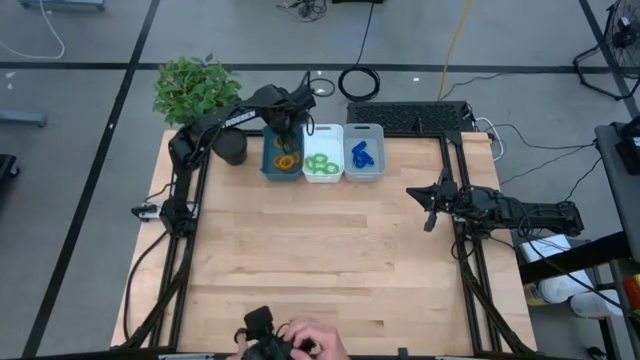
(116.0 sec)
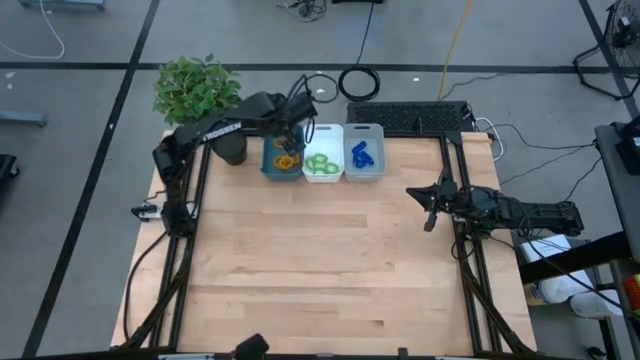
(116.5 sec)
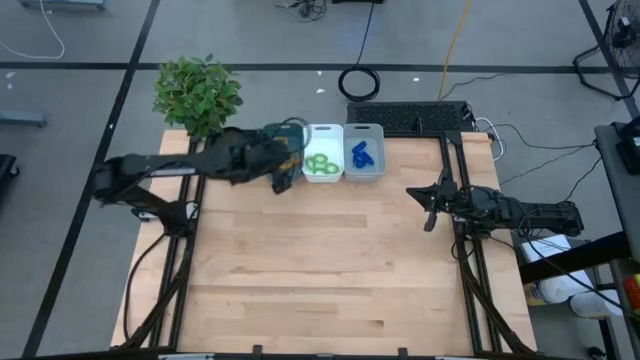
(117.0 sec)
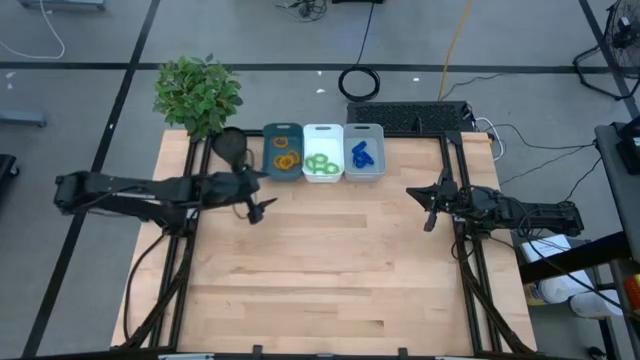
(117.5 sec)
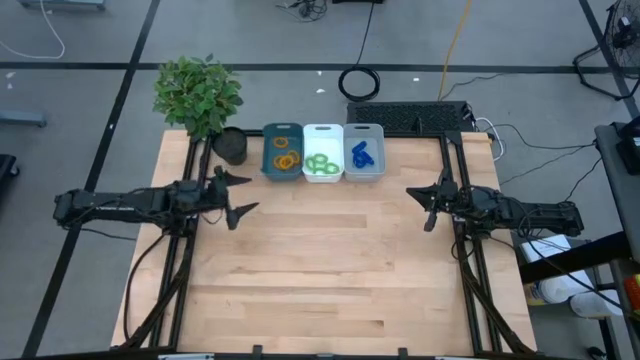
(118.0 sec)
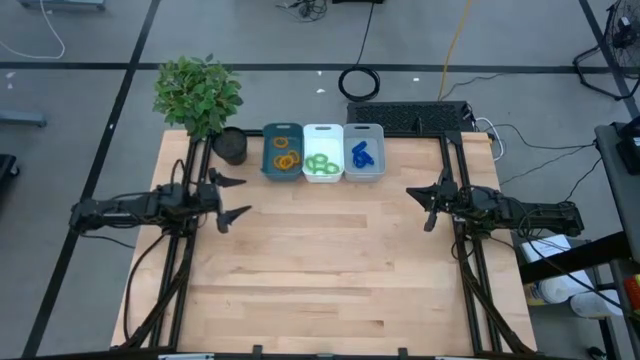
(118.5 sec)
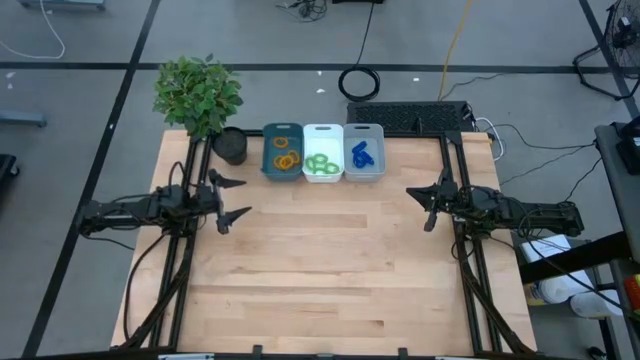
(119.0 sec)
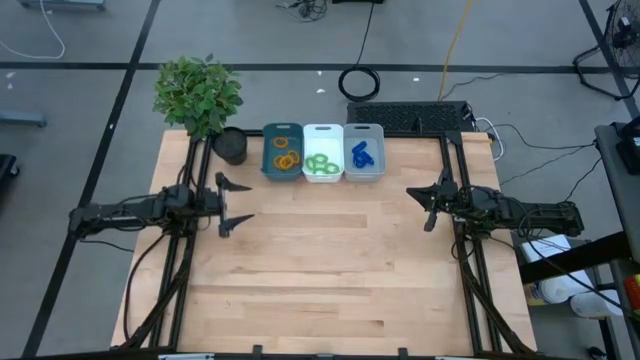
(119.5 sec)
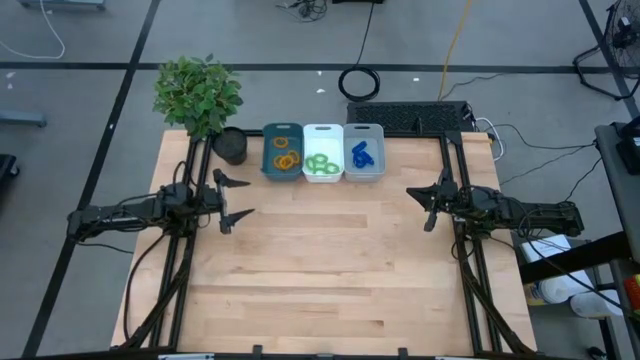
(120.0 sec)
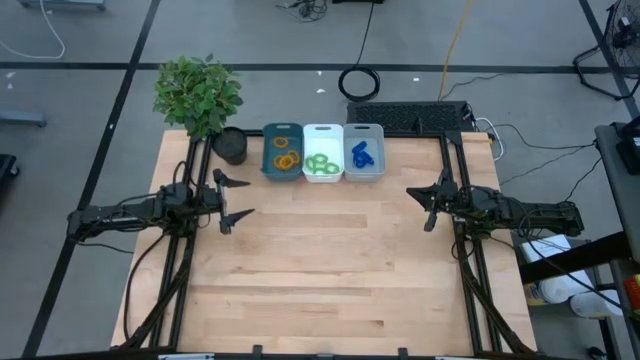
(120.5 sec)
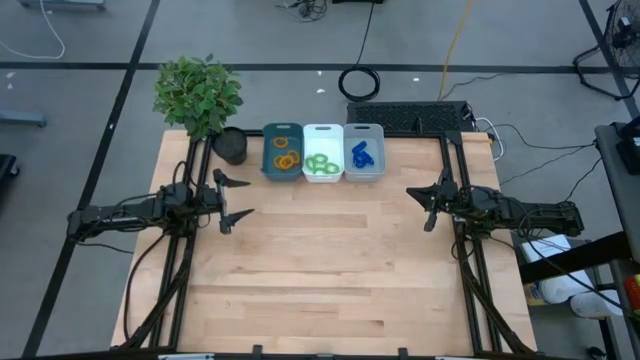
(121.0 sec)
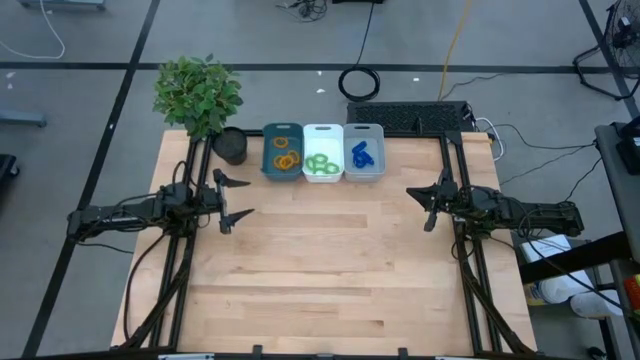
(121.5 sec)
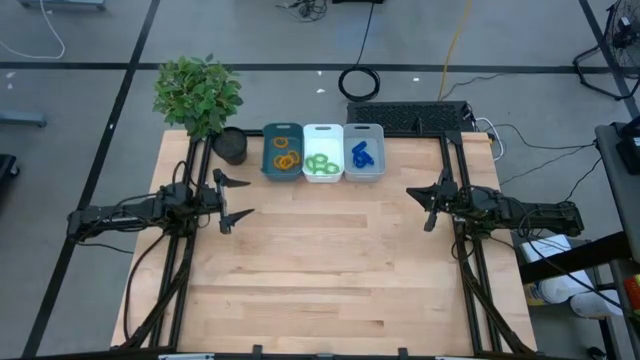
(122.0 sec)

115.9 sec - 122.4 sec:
Task: Sort spring keychains
Return to Home Position

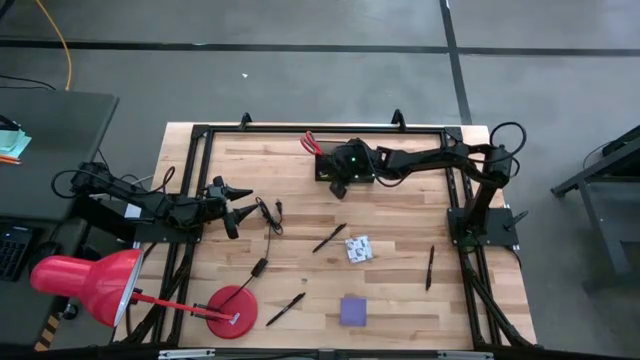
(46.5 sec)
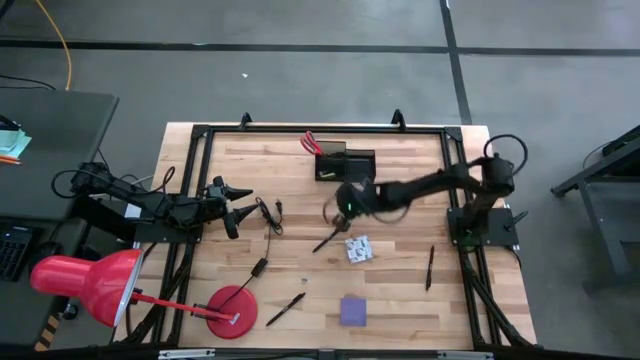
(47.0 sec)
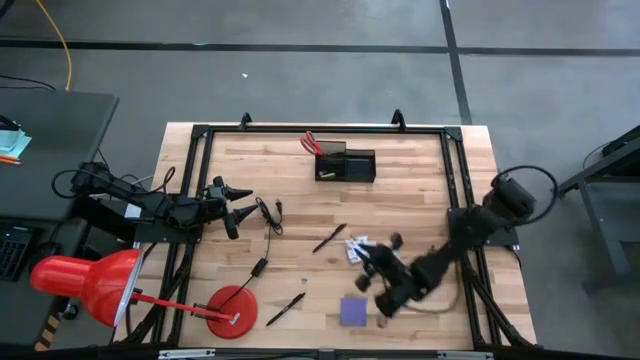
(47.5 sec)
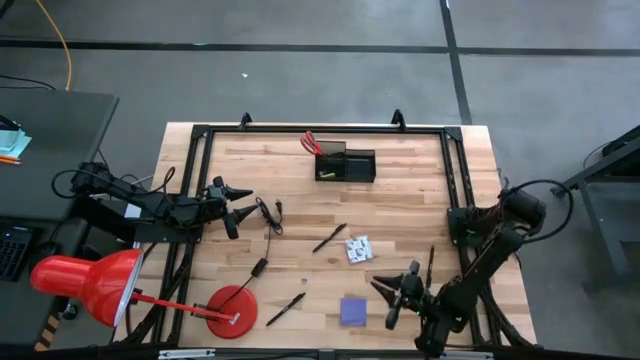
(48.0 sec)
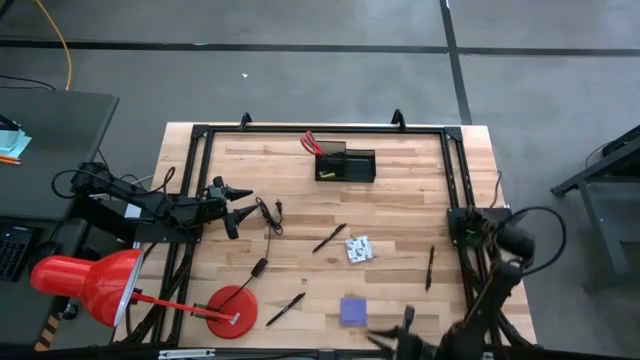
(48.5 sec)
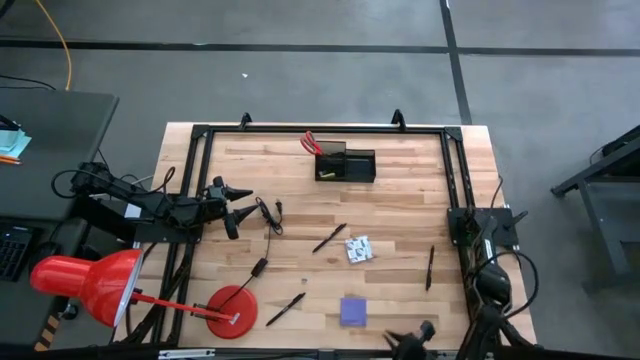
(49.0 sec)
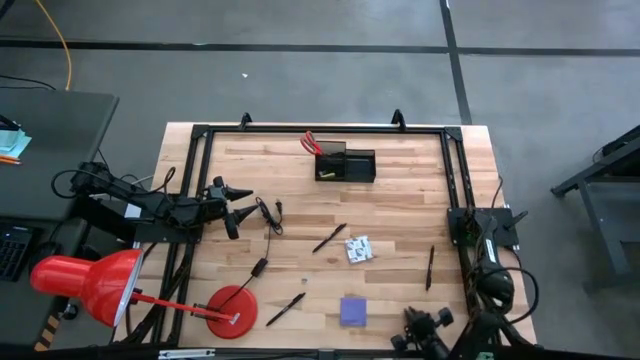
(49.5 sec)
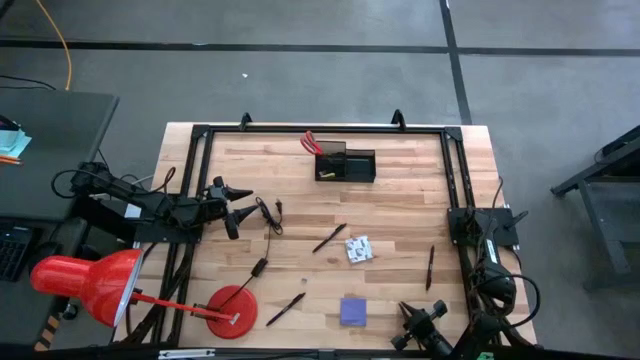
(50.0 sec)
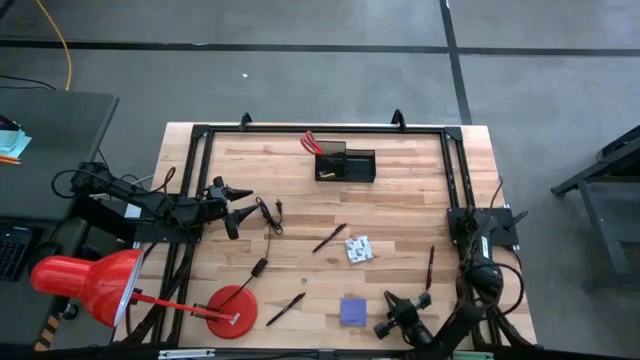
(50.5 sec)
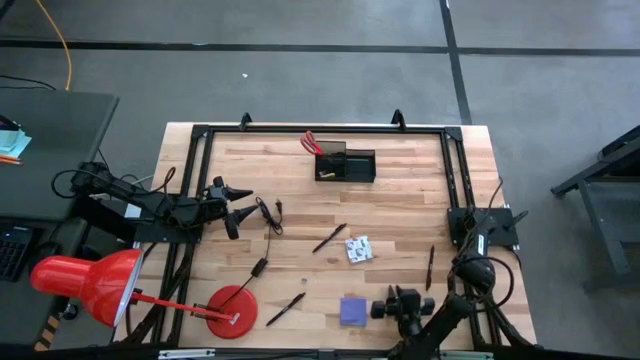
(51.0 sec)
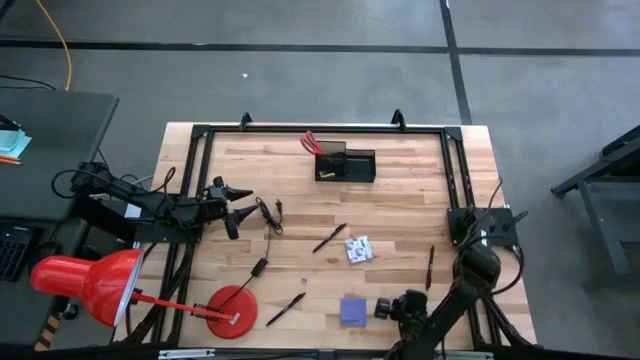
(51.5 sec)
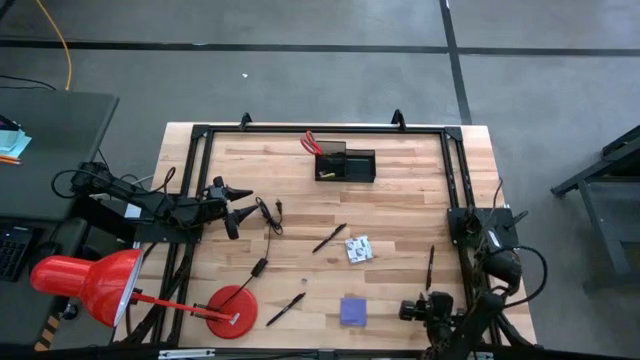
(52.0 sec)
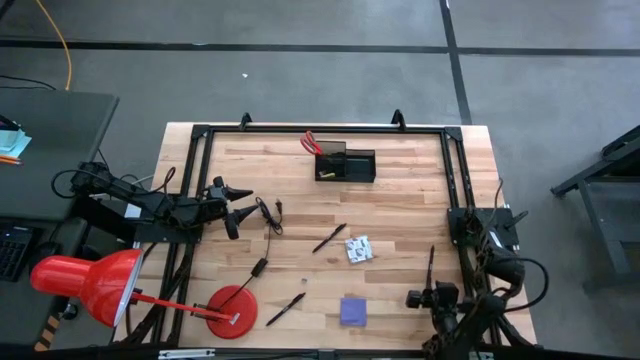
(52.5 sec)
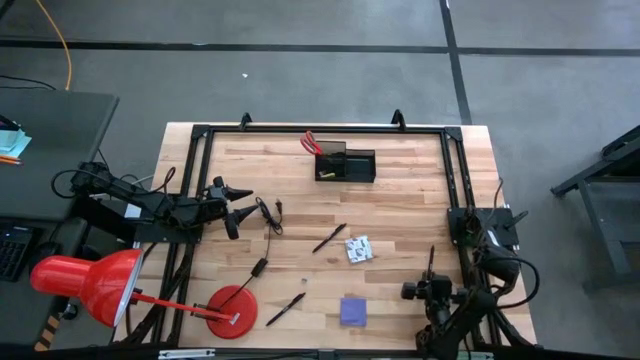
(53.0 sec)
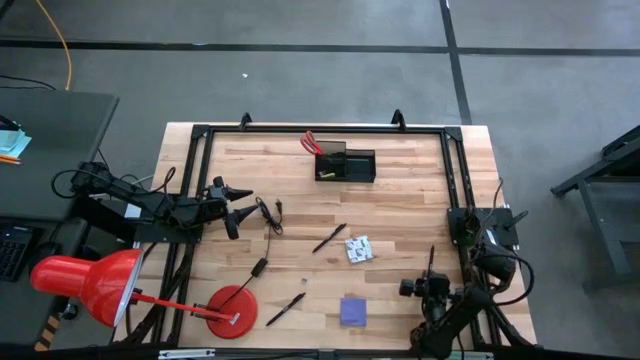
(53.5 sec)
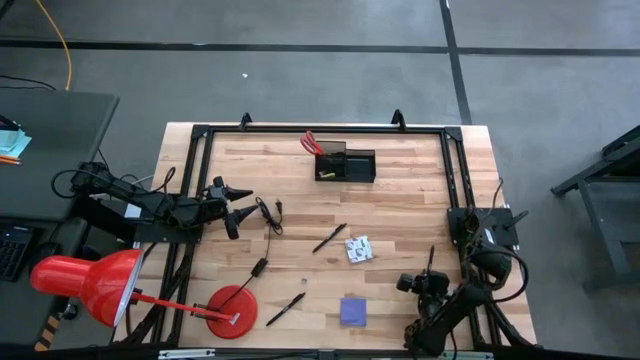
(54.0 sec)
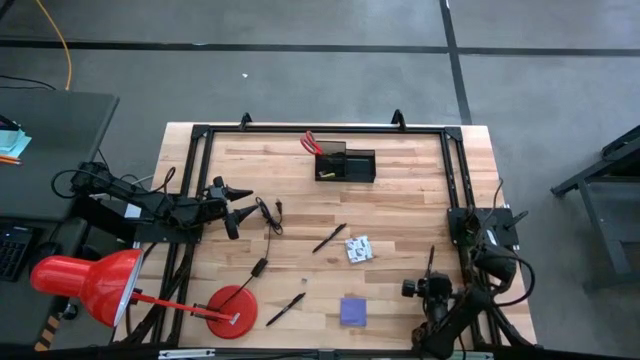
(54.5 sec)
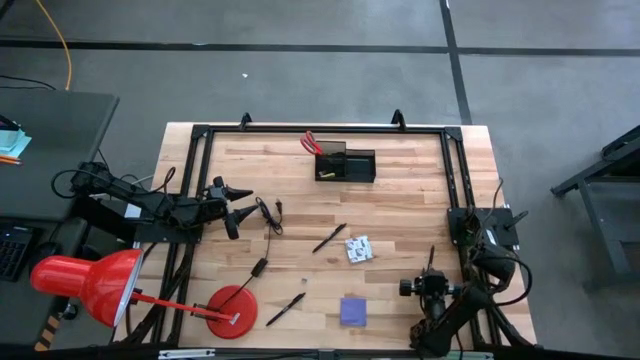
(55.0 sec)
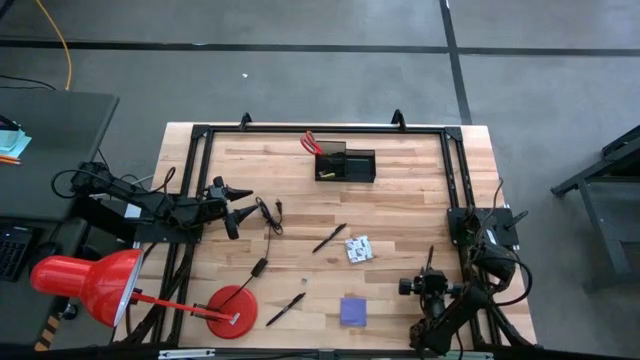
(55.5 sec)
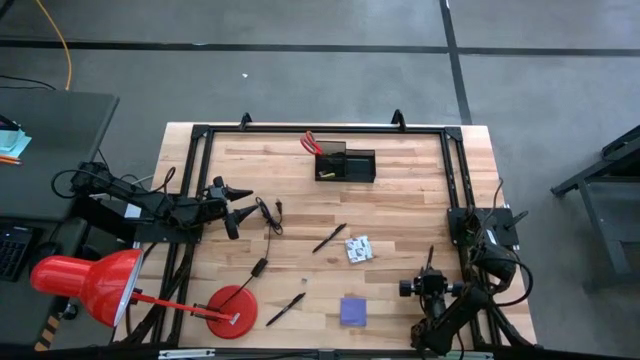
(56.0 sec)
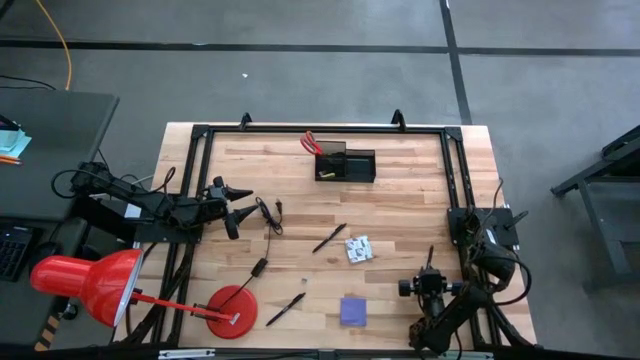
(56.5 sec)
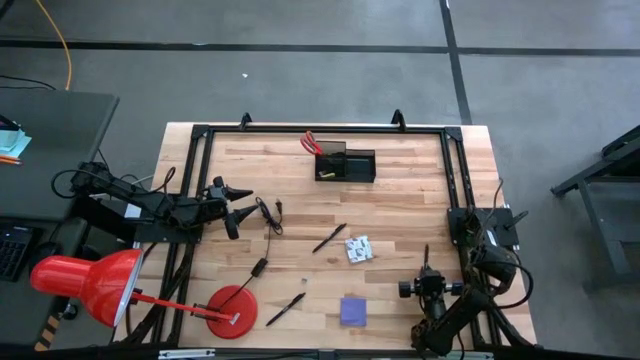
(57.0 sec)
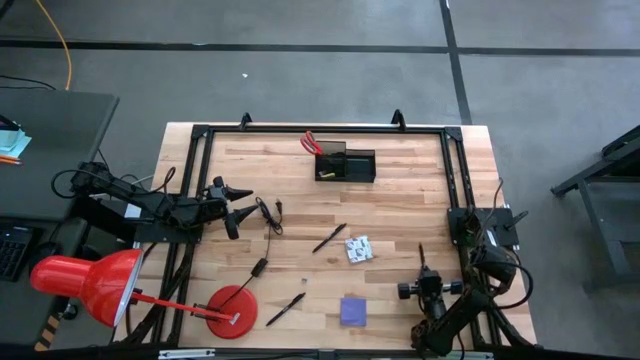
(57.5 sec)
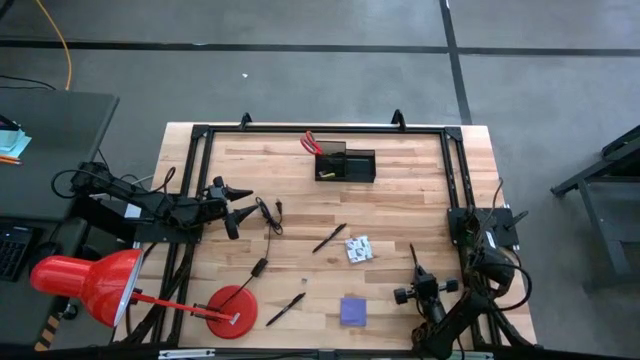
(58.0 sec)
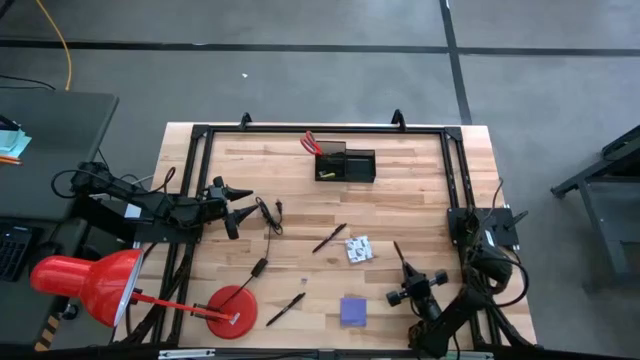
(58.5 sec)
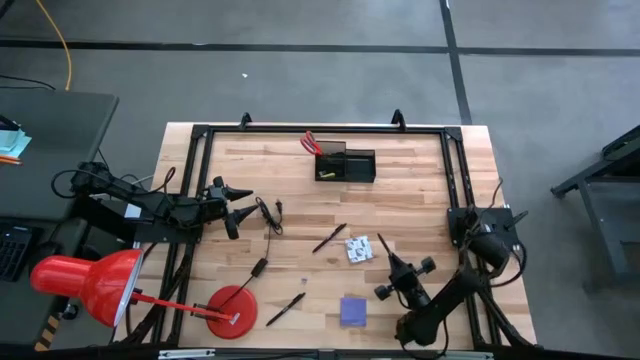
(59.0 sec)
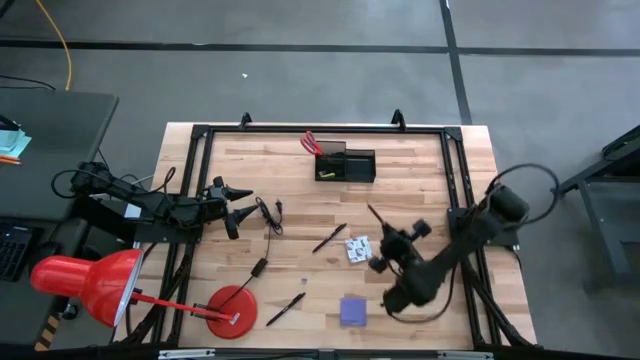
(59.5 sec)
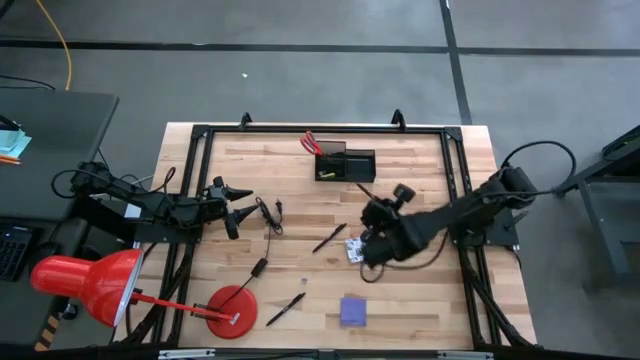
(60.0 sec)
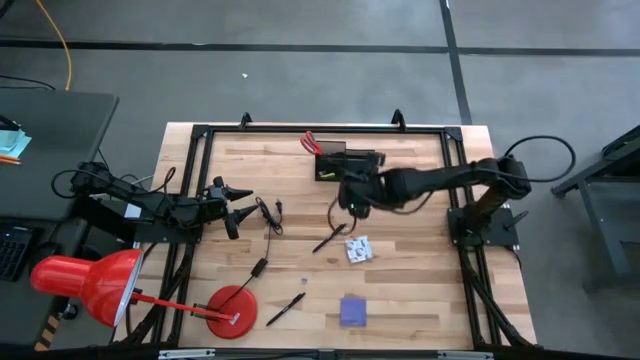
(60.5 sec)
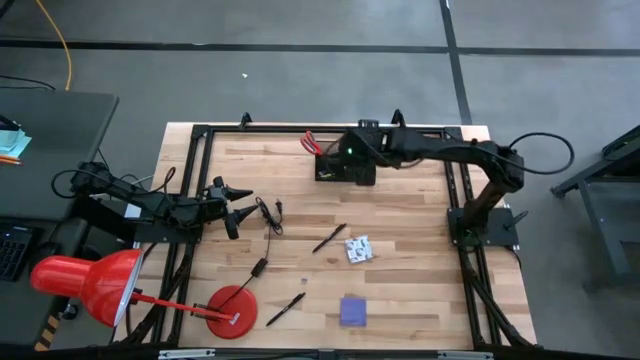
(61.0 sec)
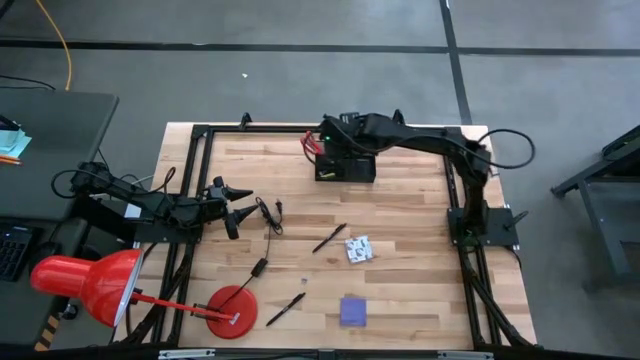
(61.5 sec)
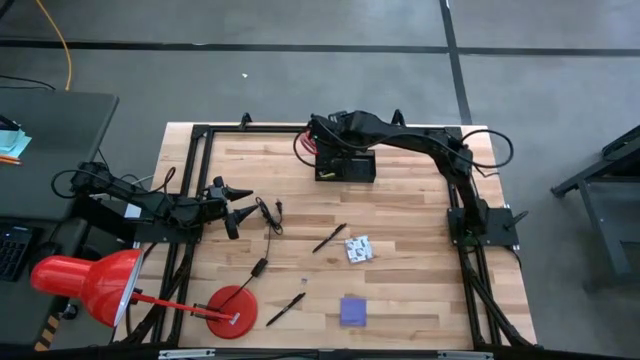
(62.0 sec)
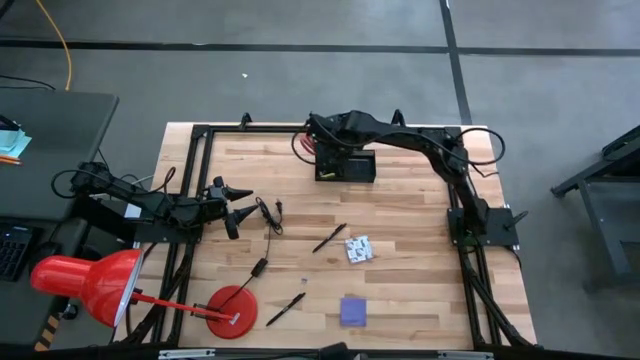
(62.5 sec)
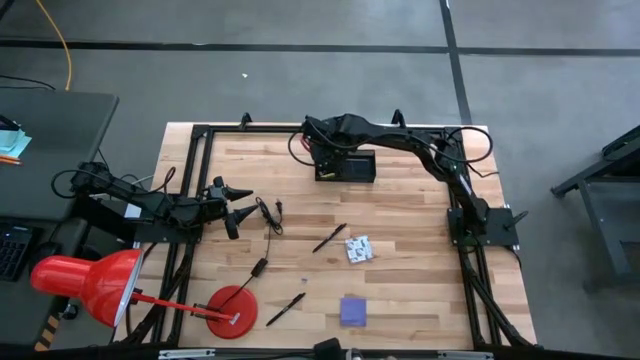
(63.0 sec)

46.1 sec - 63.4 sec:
Task: Pick and place office supplies into organizer
Put the right black pen into the mesh desk organizer
